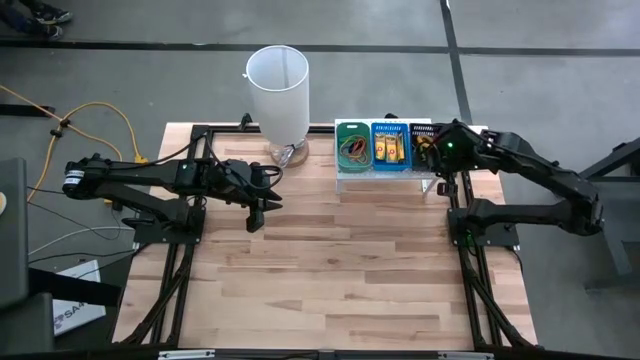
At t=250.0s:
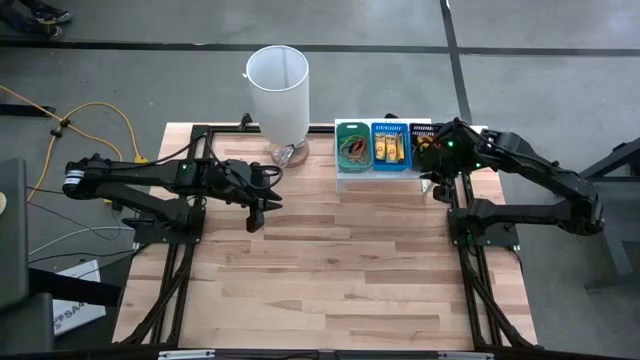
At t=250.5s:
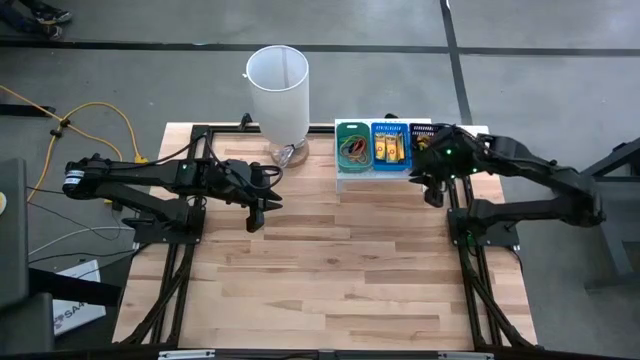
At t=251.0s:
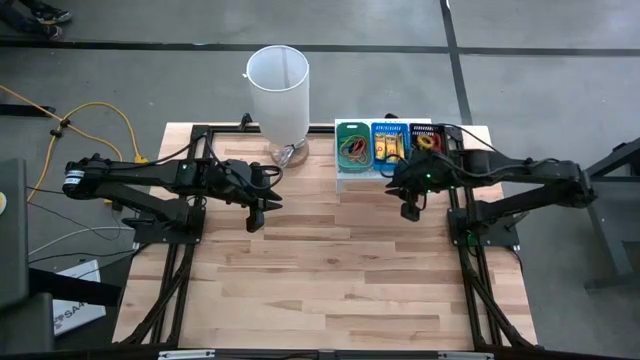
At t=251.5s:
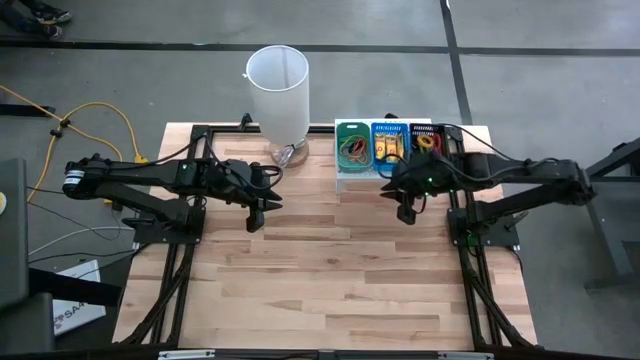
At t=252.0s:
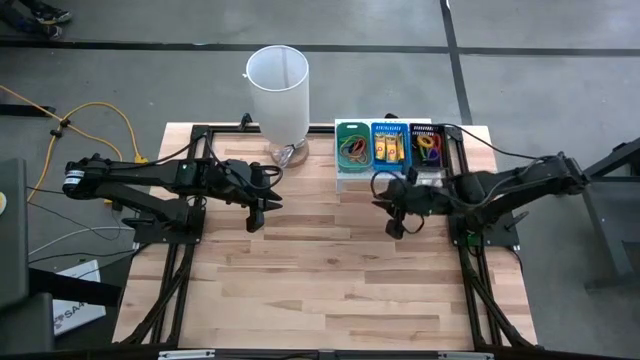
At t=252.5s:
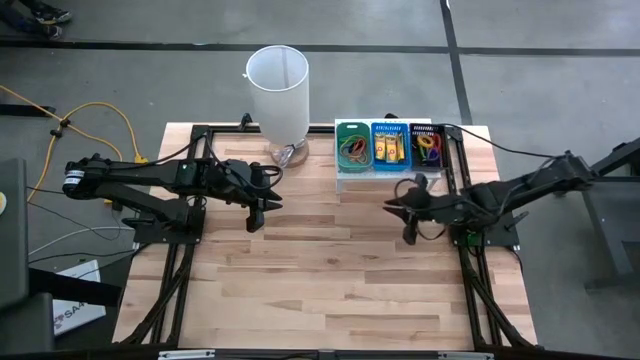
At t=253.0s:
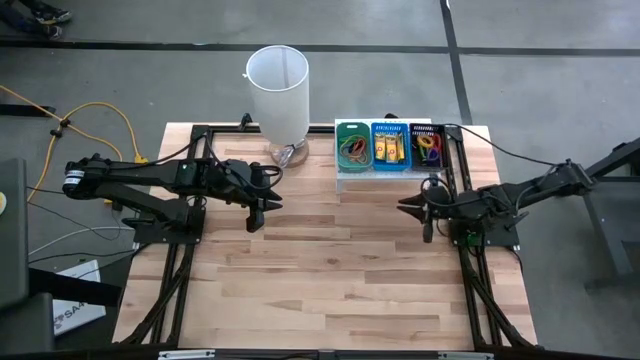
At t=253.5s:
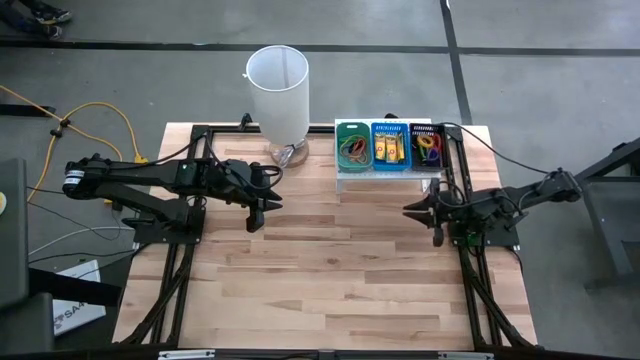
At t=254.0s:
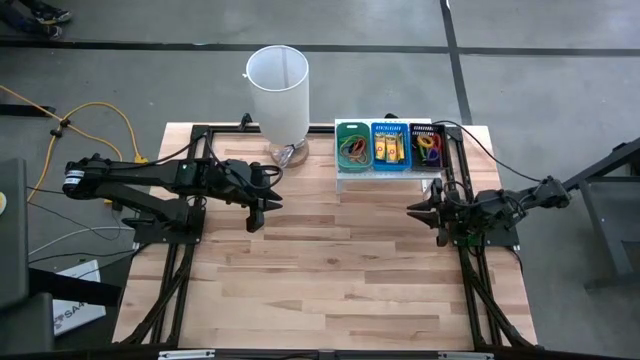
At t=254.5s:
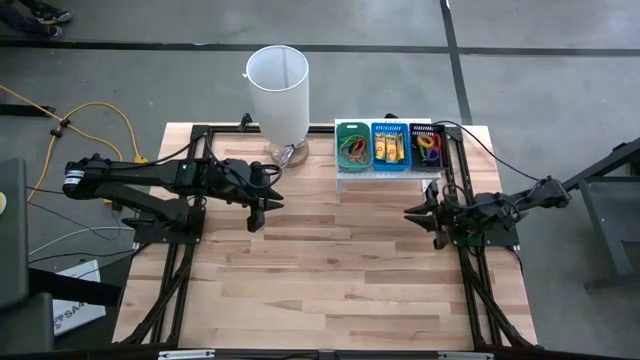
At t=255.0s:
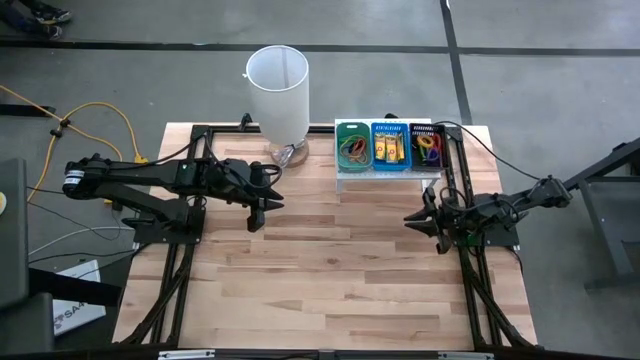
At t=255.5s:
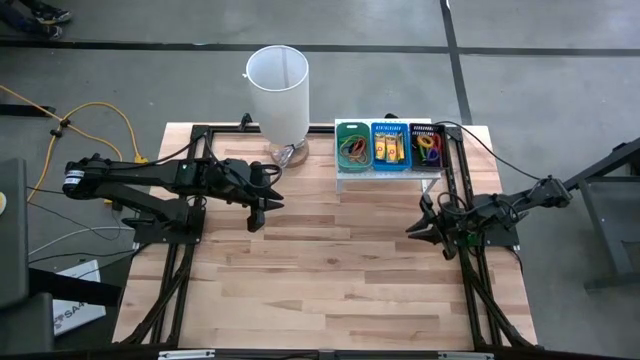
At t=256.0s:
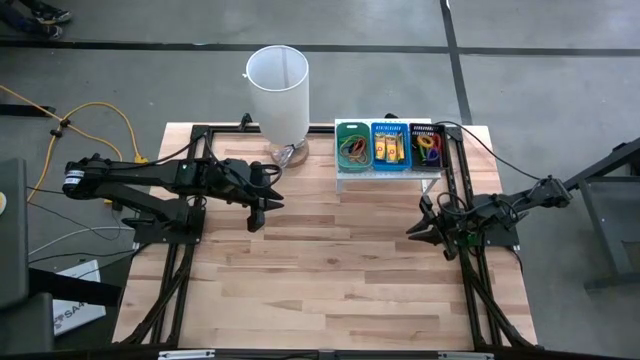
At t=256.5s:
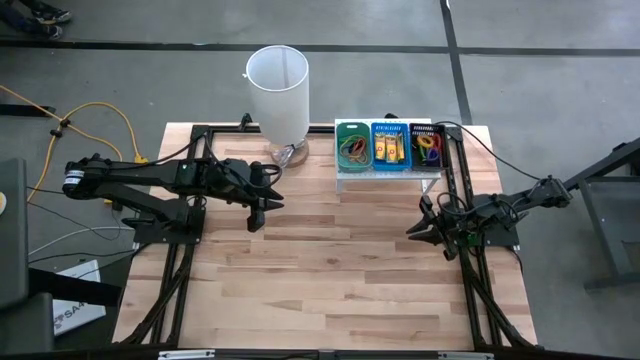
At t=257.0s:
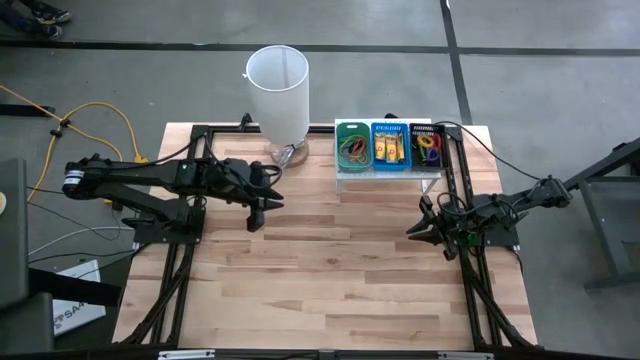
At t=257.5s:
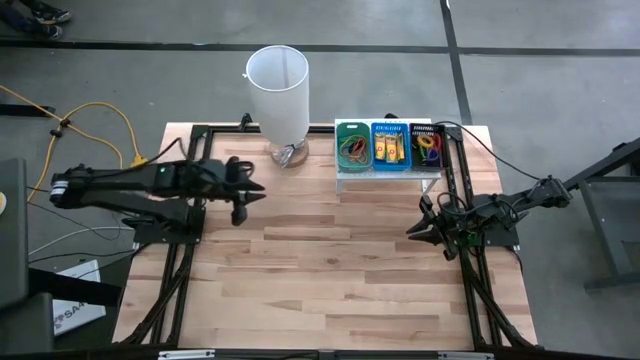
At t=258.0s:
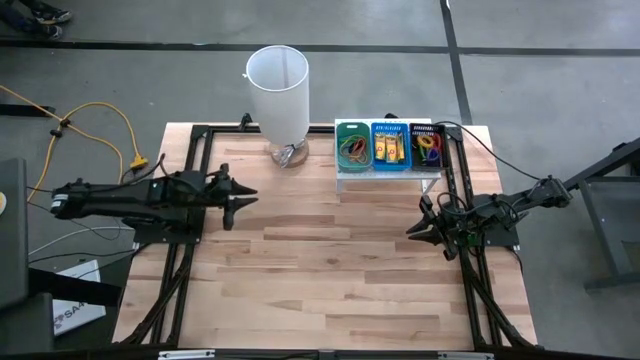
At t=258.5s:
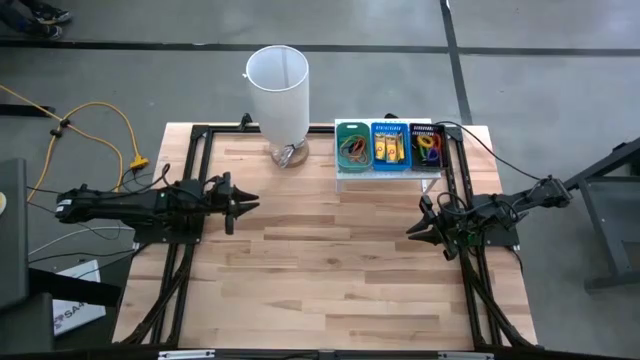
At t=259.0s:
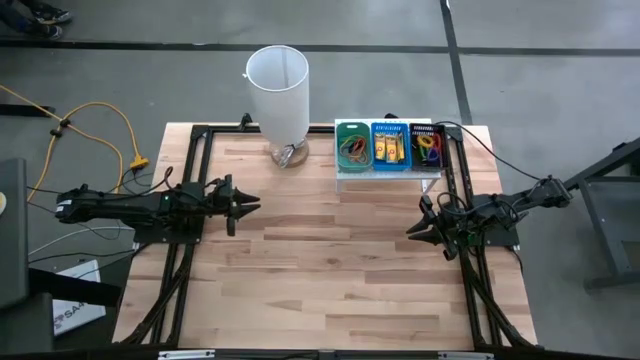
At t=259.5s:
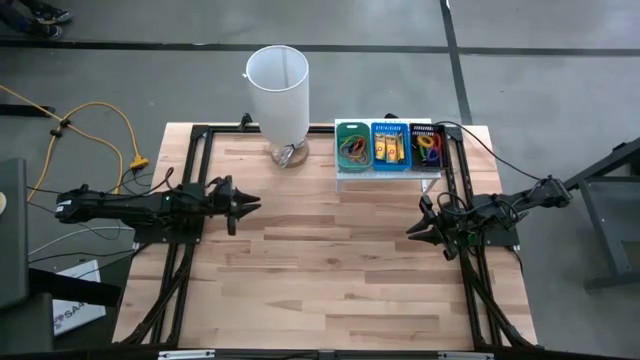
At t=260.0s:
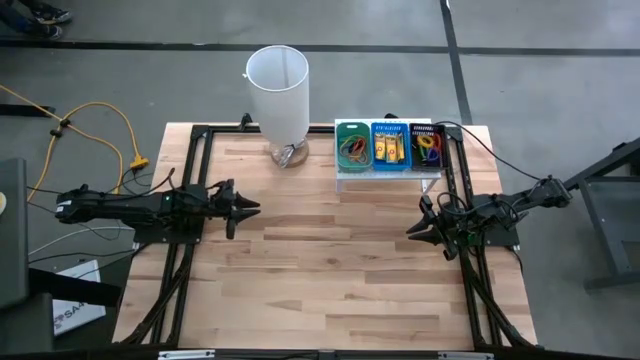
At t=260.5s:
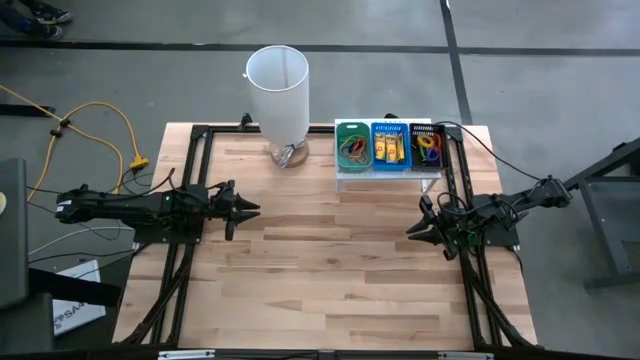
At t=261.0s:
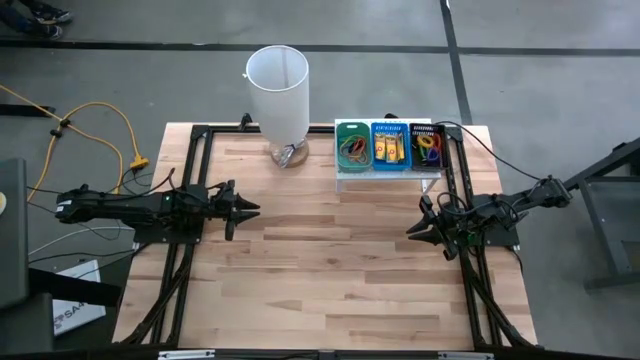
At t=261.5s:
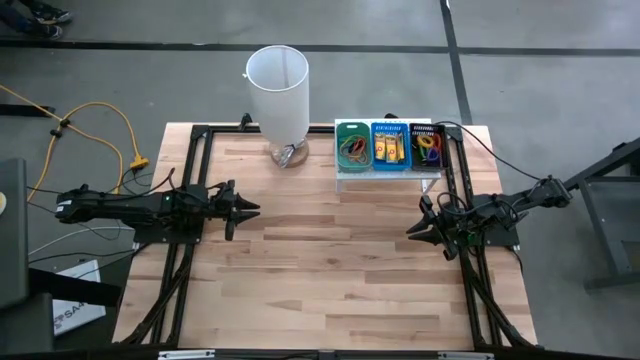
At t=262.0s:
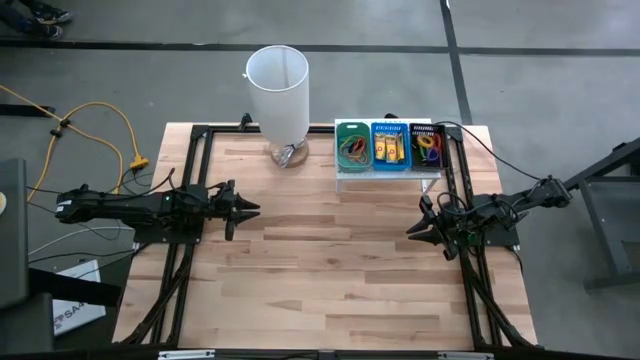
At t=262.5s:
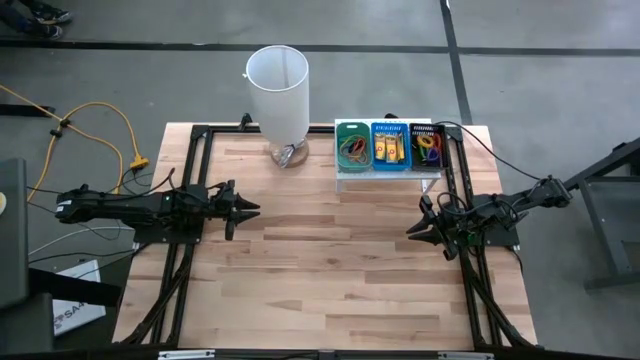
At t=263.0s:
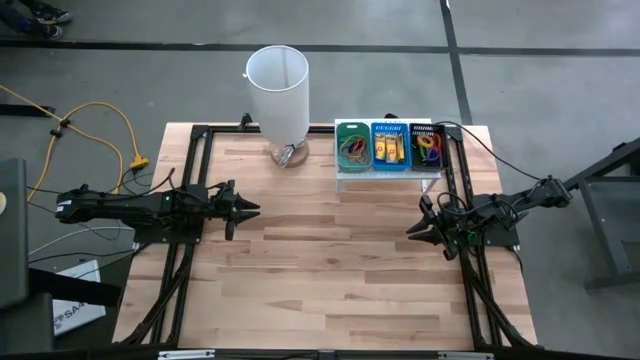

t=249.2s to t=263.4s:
Task: Pick & Place Office Desk Supplies
Return to Home Position

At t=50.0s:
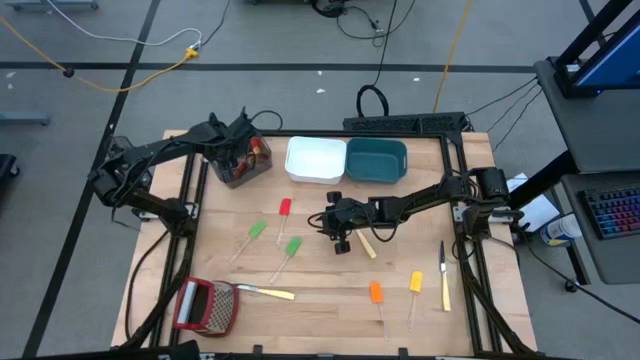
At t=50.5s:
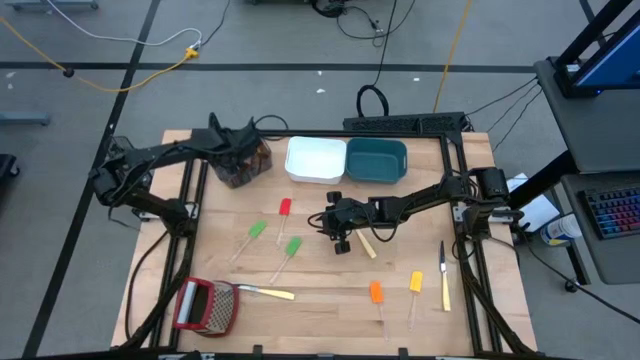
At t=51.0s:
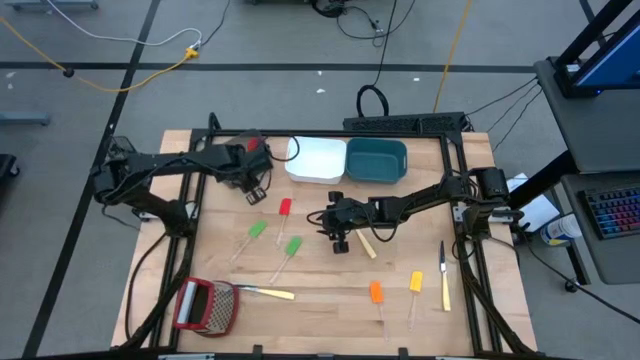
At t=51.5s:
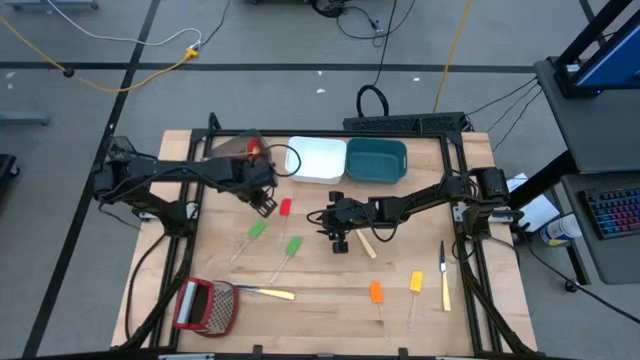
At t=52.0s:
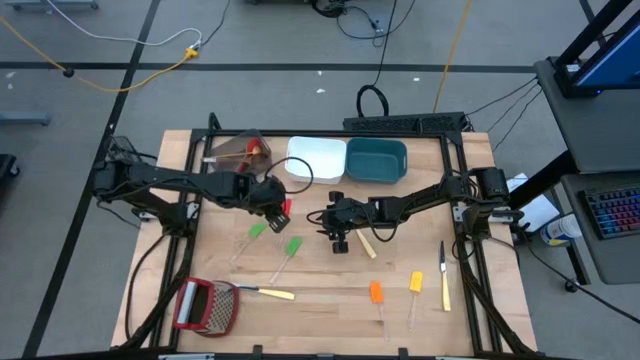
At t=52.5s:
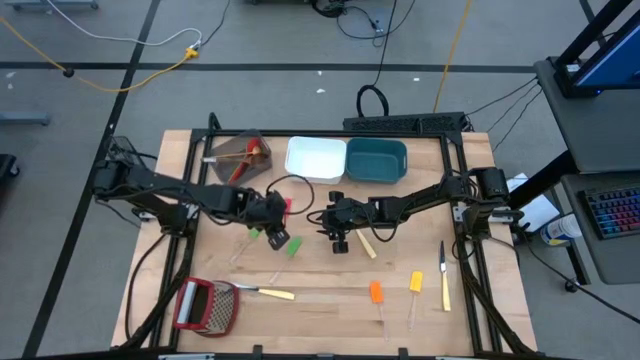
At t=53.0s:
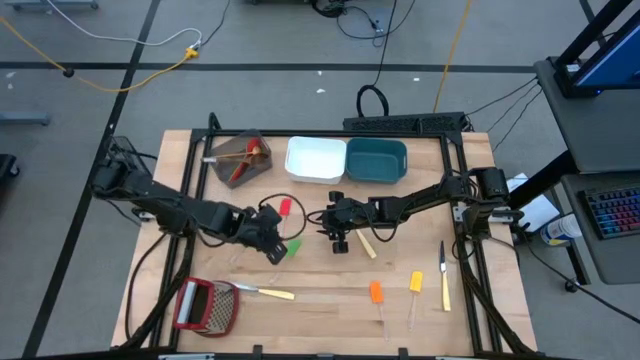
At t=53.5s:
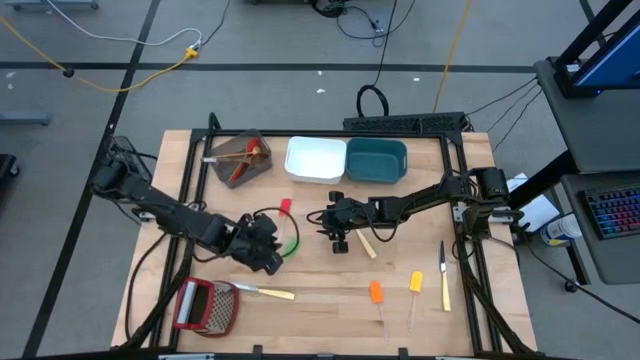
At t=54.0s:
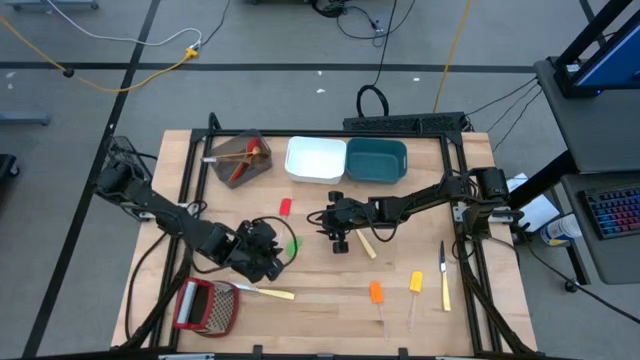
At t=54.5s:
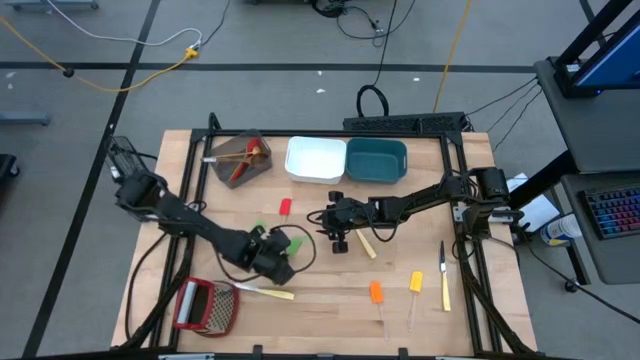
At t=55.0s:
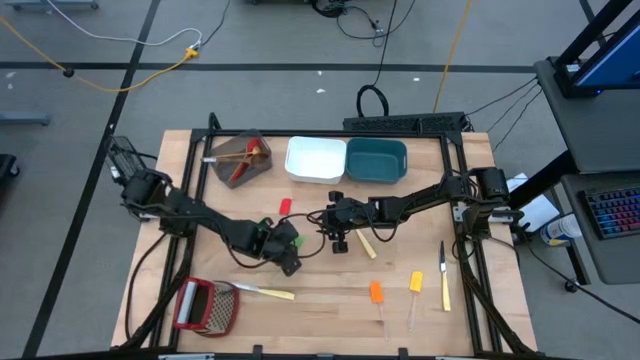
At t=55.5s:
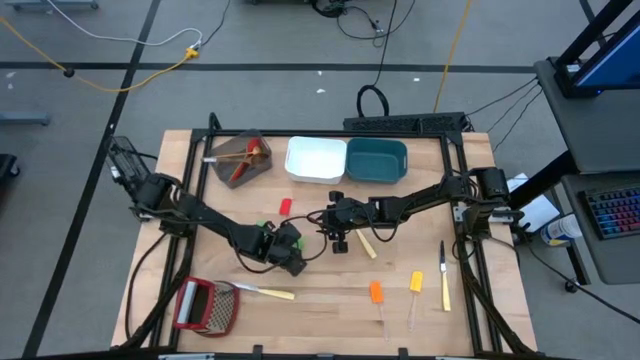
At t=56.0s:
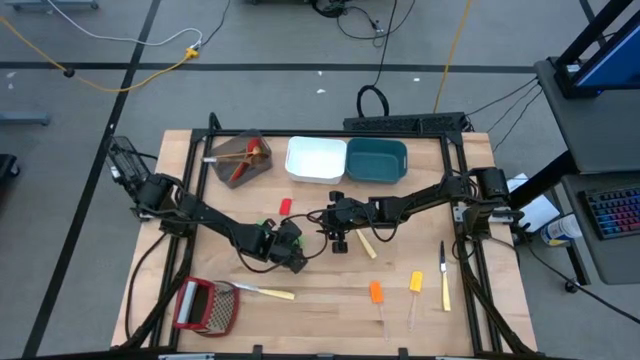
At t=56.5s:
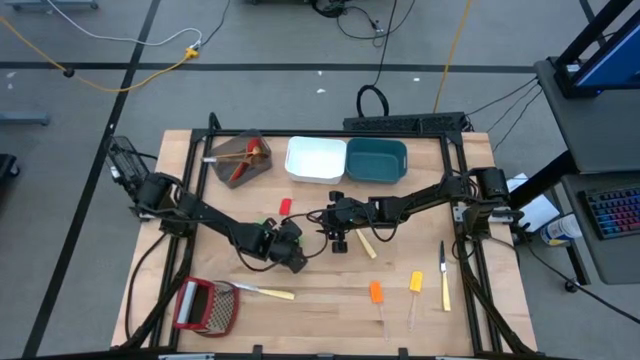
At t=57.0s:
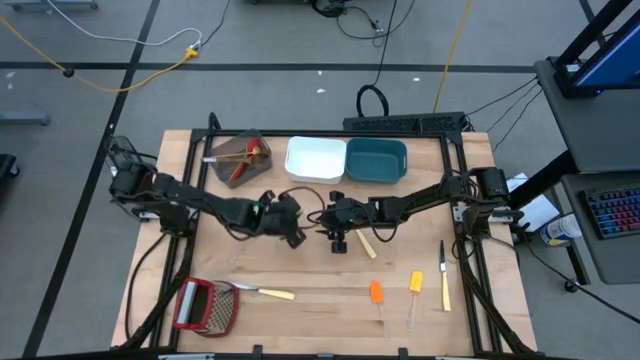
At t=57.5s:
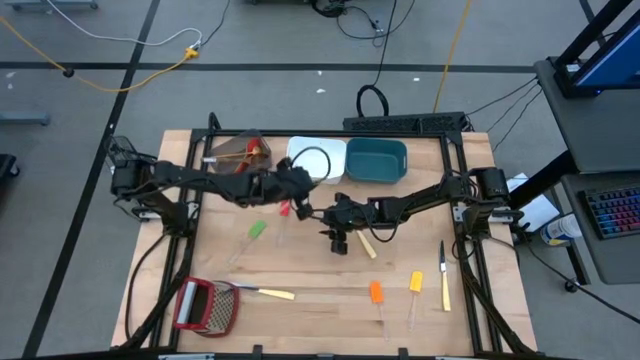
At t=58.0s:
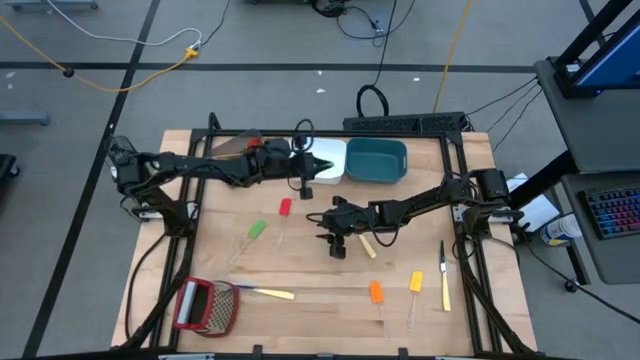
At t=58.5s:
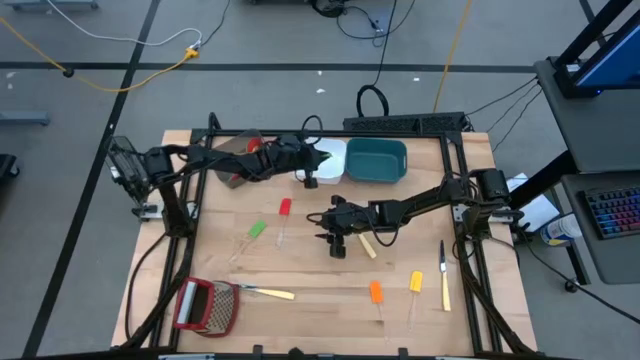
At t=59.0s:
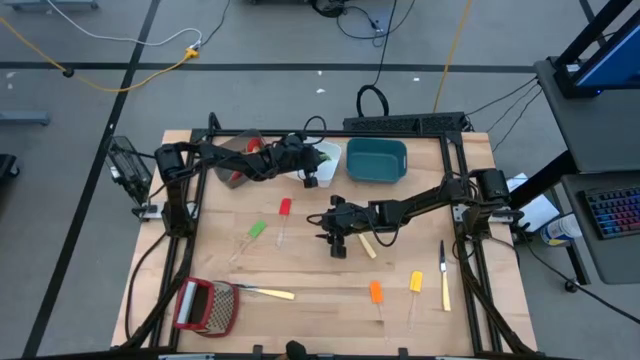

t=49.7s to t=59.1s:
Task: Pick & Place Kitchen Items
Put the right green spatula into the white bin
